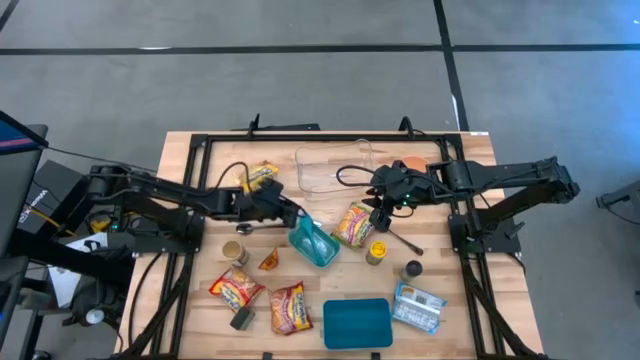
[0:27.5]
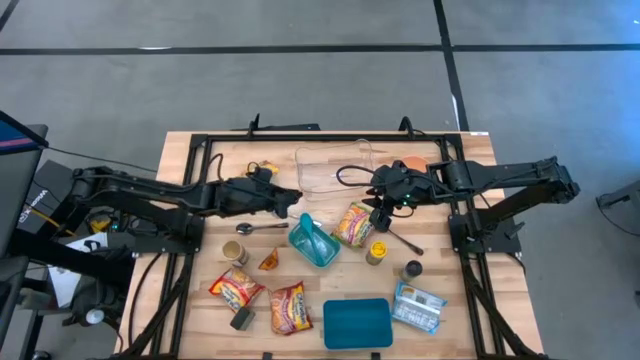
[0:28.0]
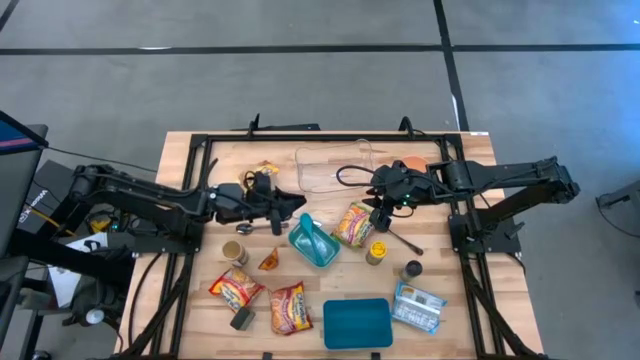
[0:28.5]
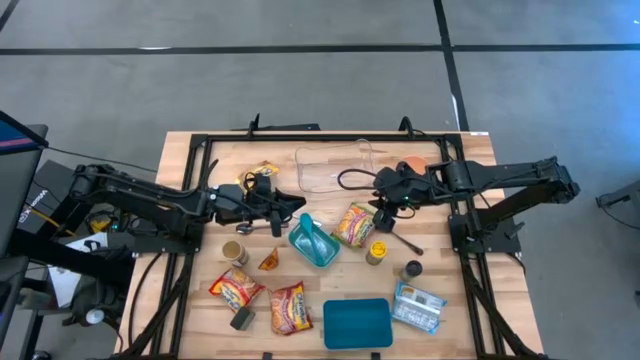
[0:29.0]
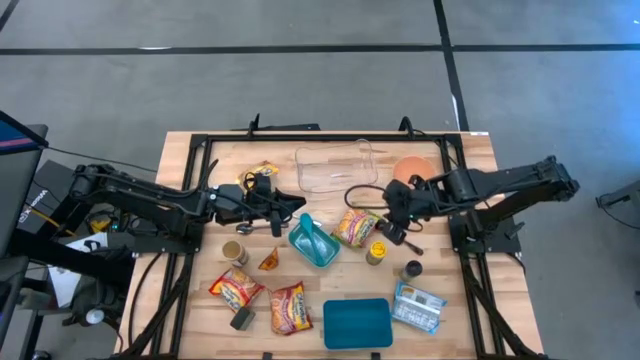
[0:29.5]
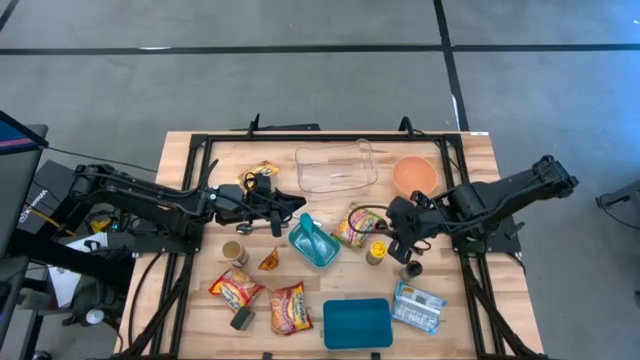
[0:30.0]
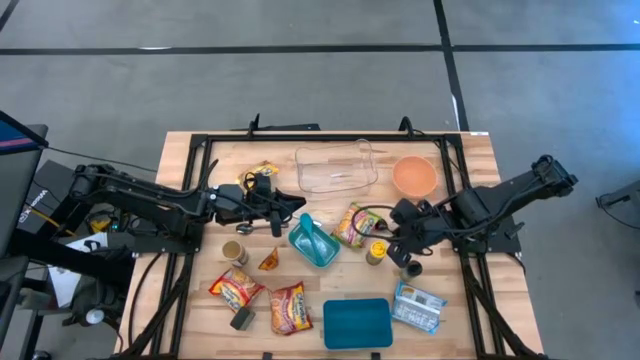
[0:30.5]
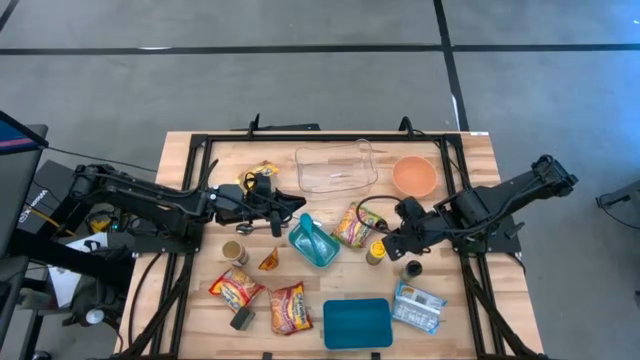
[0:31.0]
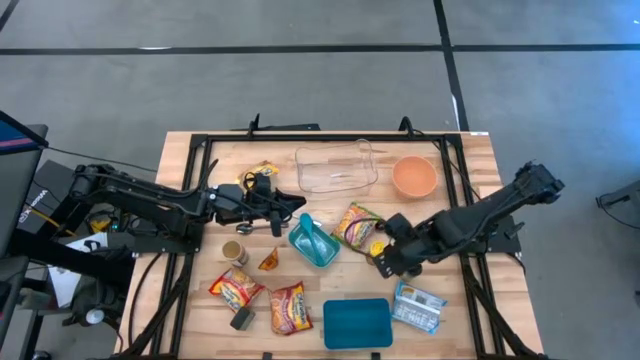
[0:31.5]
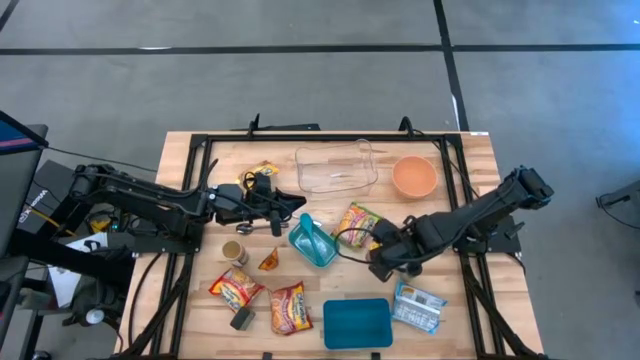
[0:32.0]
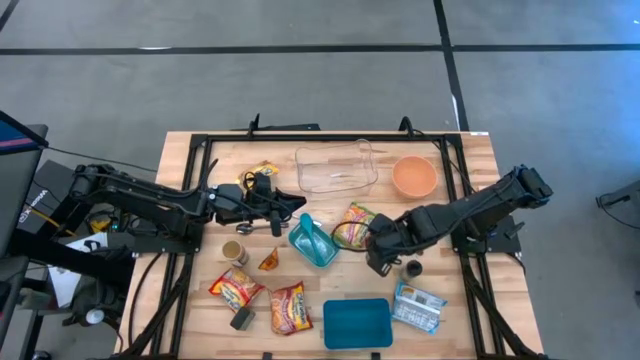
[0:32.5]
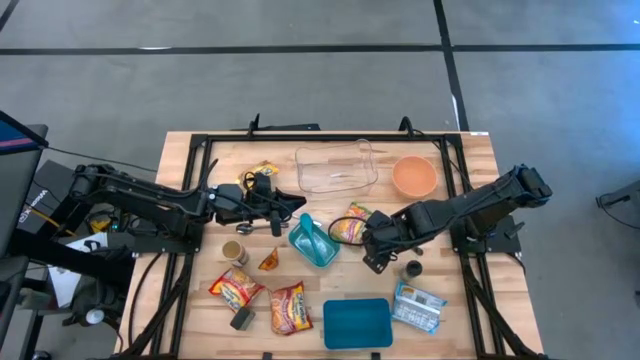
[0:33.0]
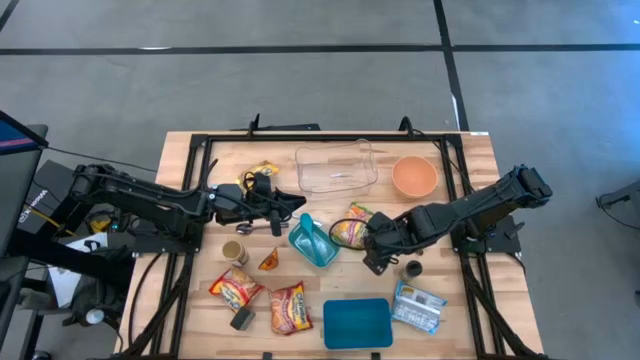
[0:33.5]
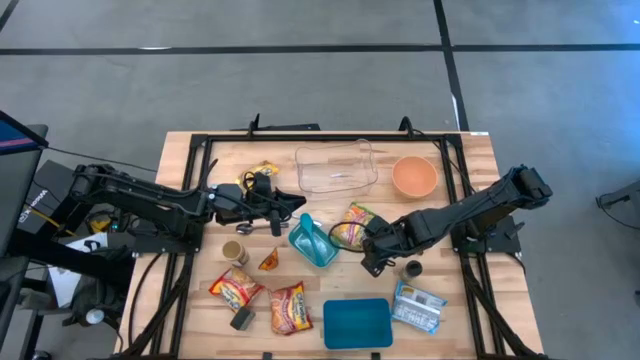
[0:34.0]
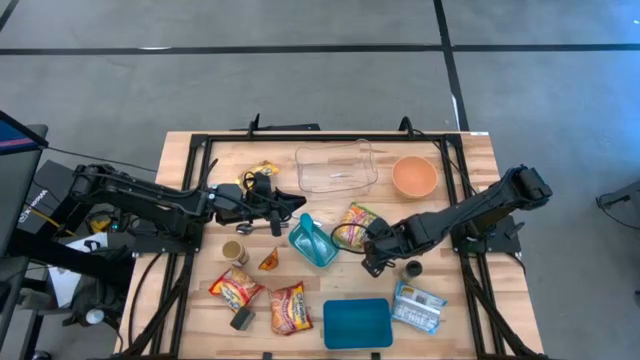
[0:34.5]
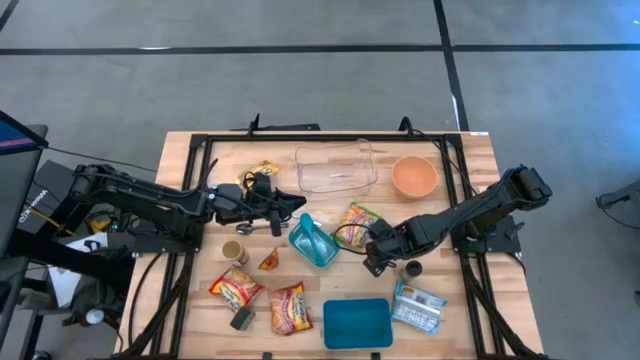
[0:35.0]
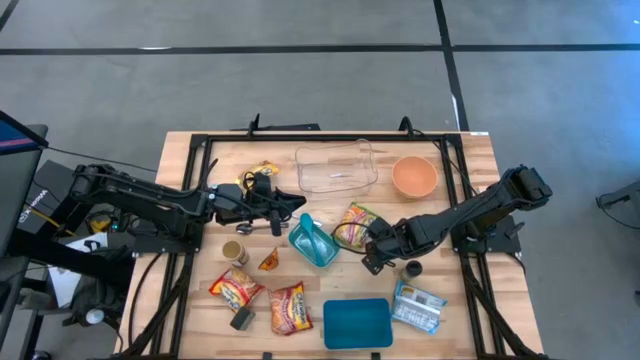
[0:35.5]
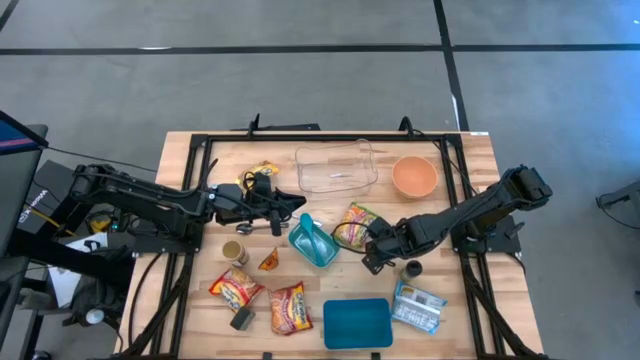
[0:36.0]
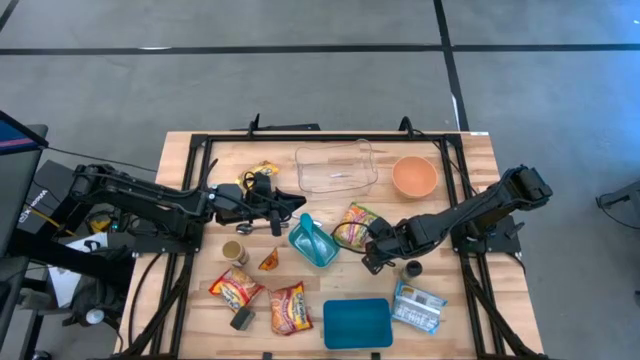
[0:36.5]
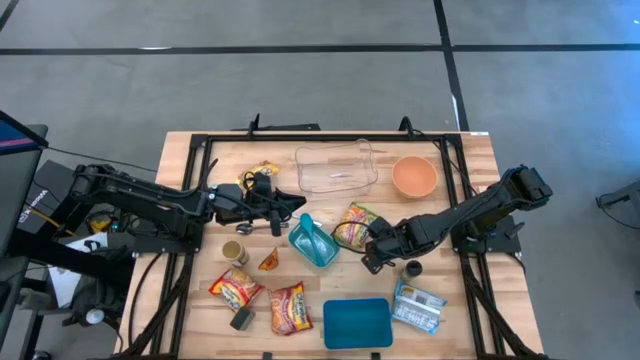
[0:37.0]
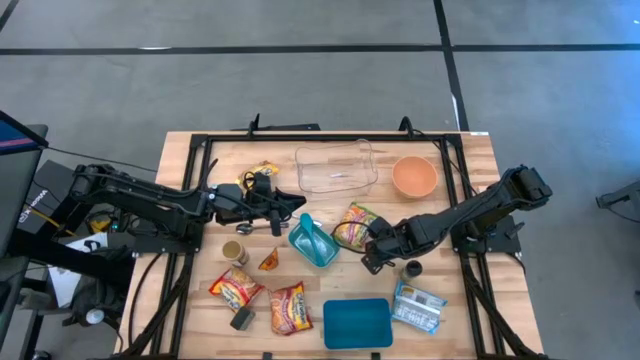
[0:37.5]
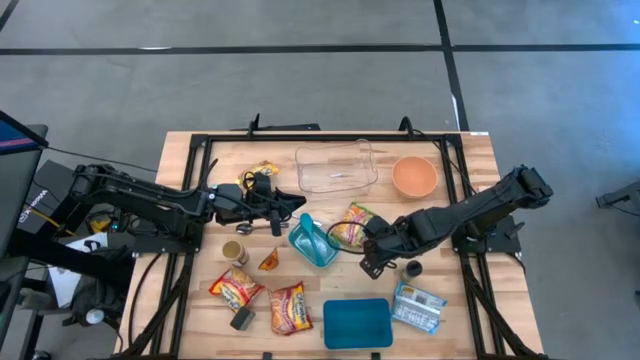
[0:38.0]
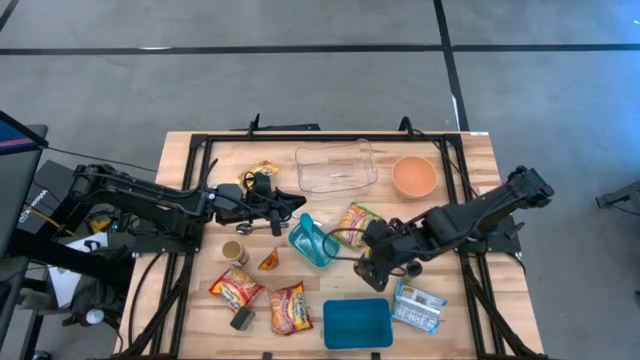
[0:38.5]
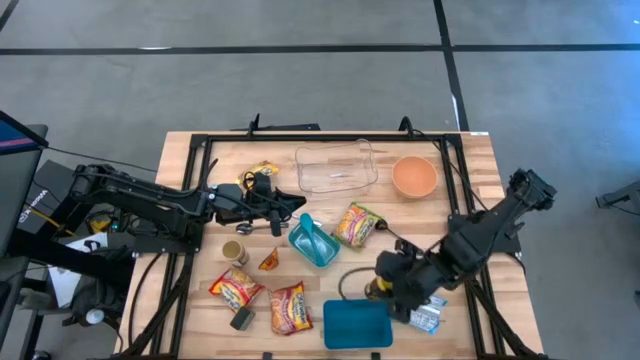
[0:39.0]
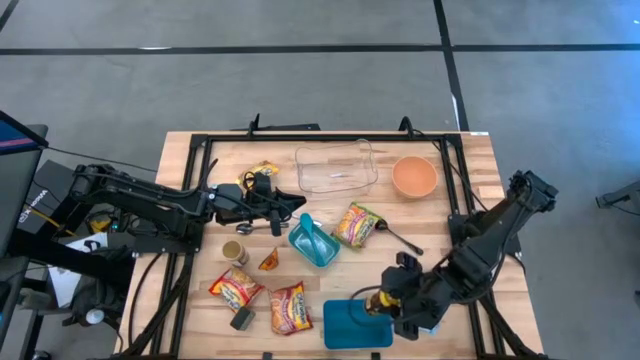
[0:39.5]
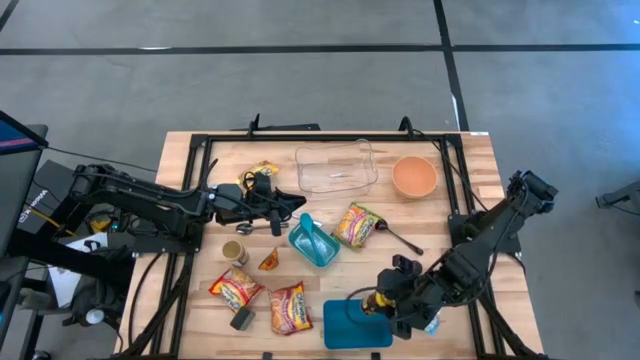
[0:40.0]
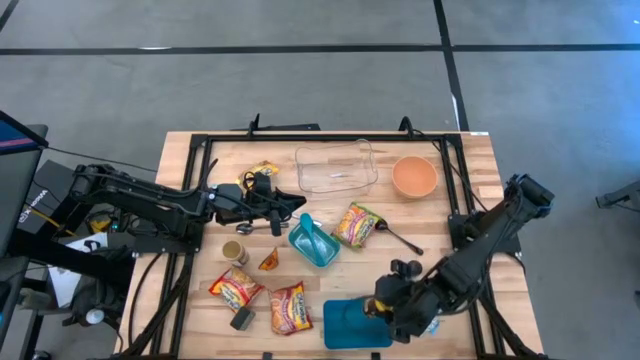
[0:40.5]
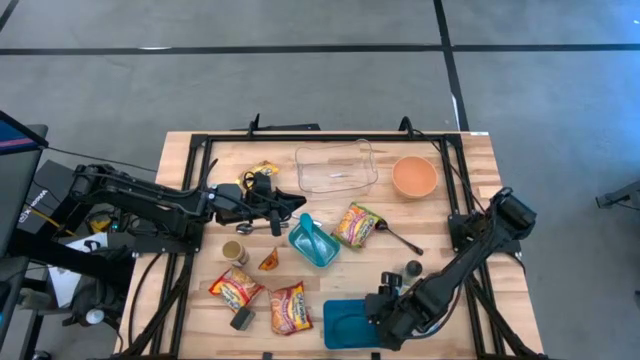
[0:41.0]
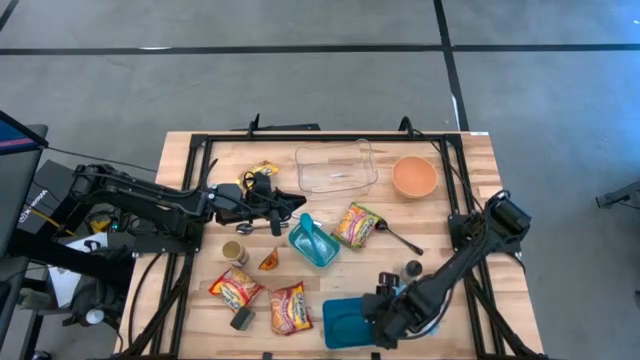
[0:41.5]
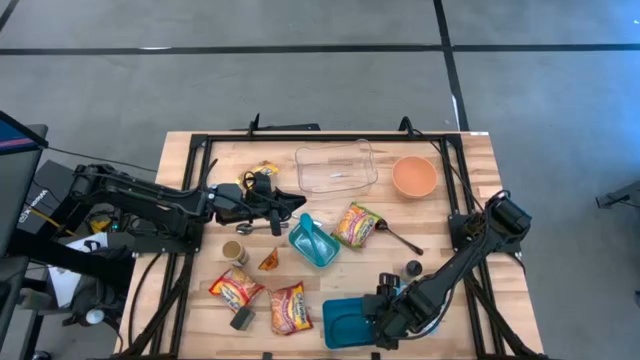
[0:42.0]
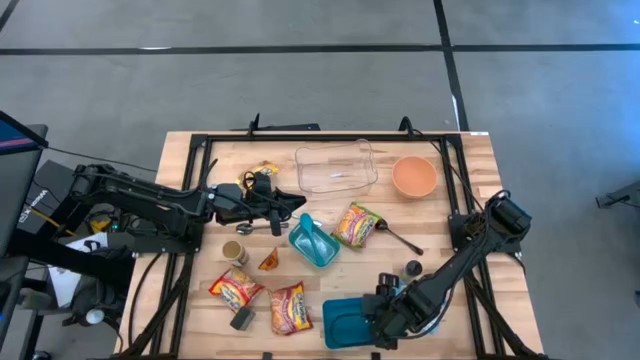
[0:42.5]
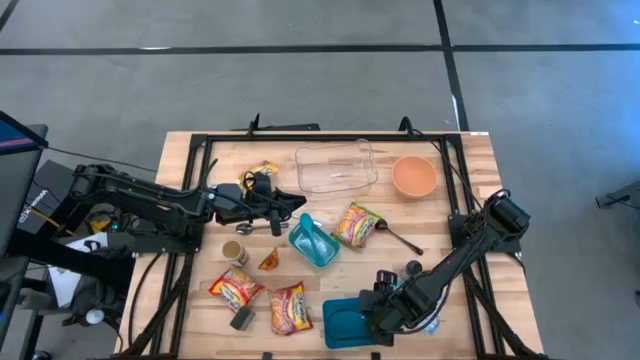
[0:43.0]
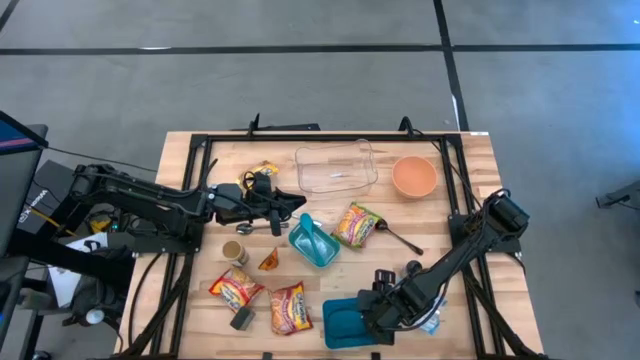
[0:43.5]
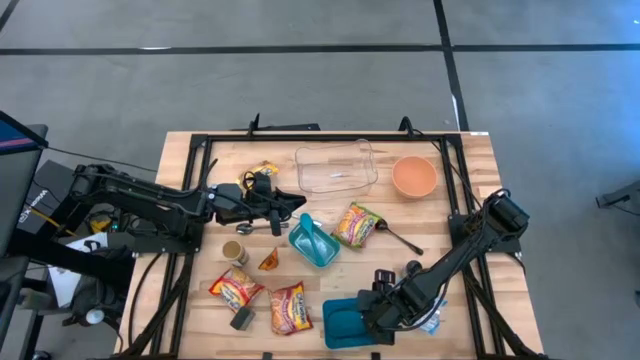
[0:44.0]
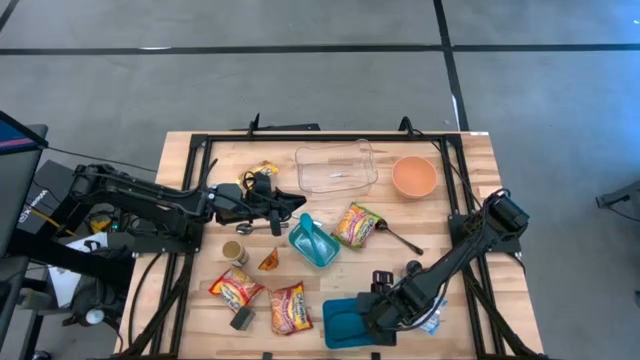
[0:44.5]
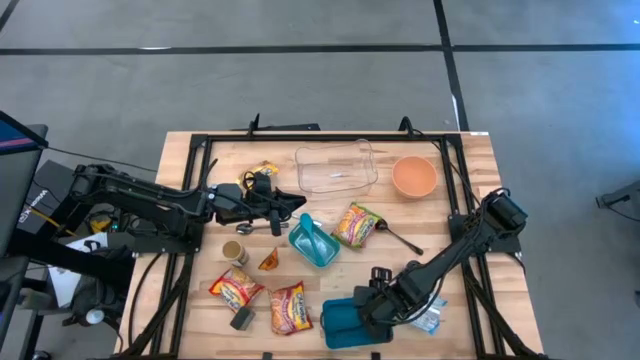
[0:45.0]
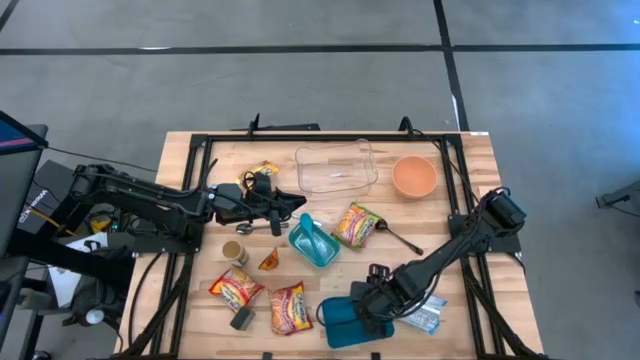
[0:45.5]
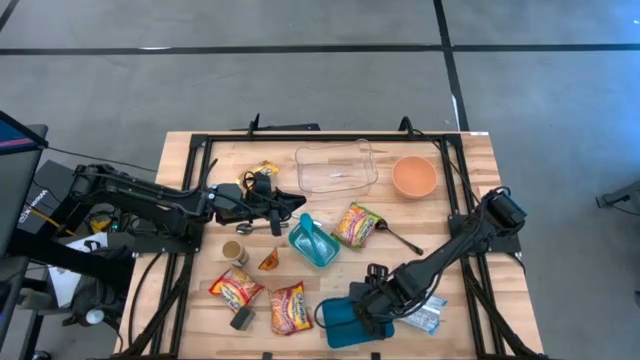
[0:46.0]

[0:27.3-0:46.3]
Task: Pick & Place Food Item
Put the yellow seasoning bottle into the blue bin

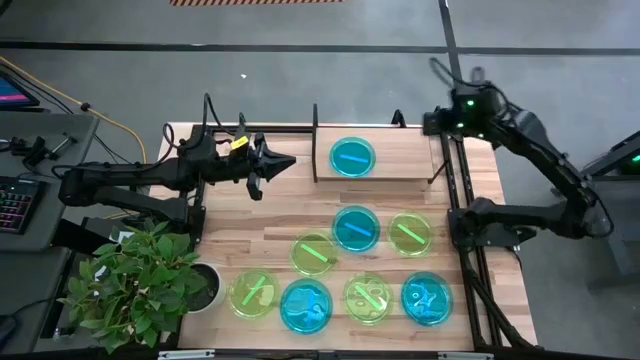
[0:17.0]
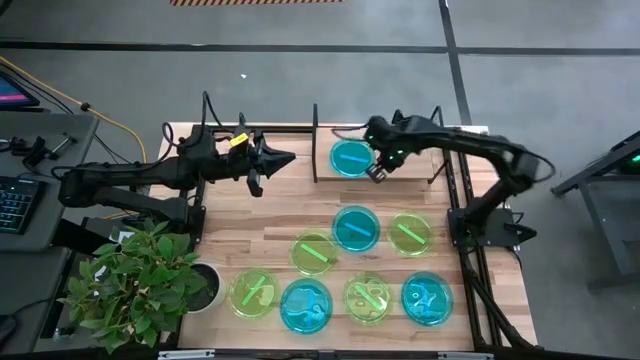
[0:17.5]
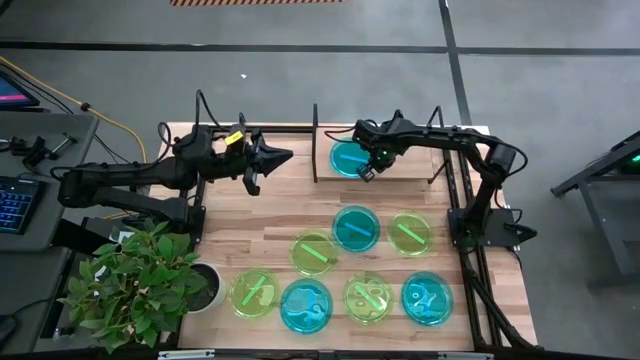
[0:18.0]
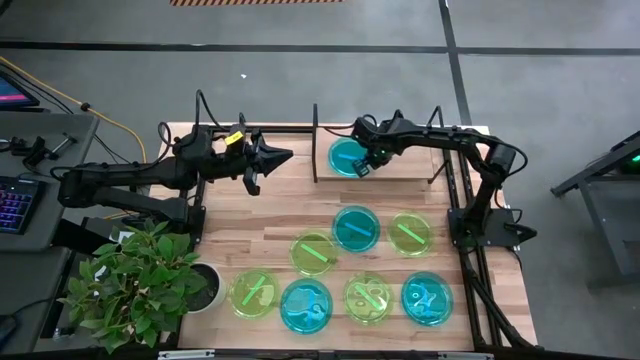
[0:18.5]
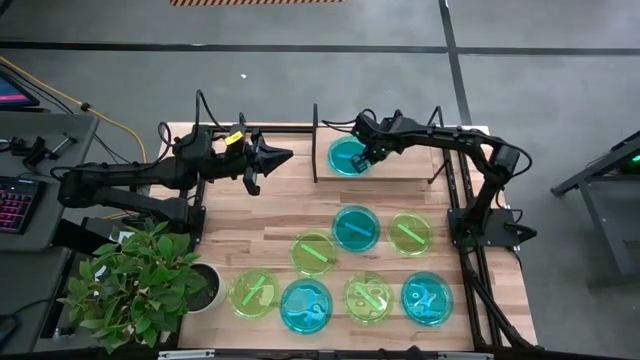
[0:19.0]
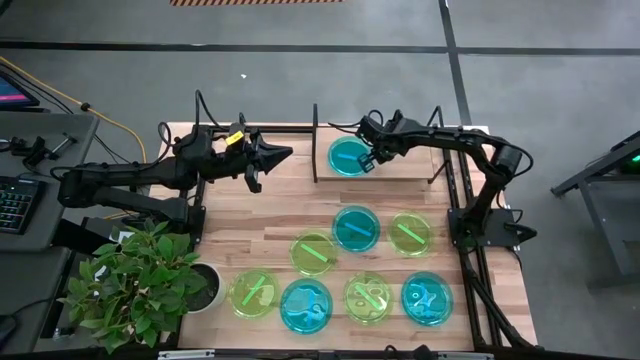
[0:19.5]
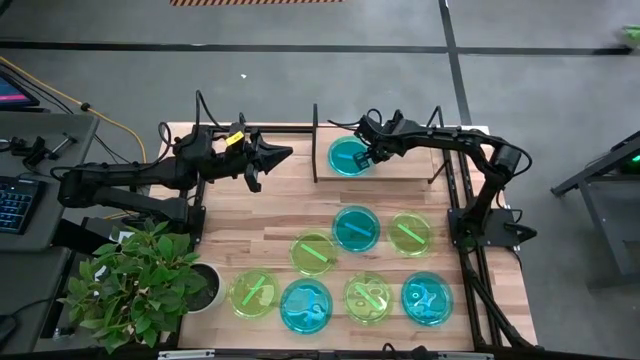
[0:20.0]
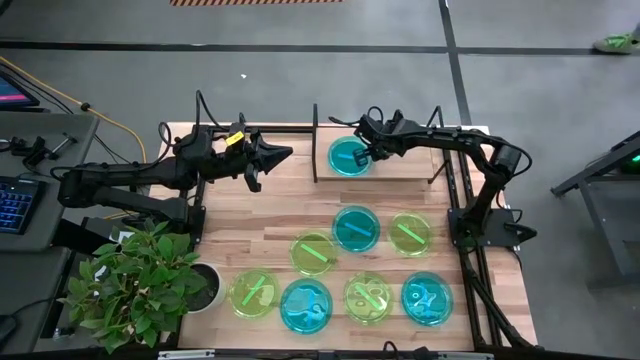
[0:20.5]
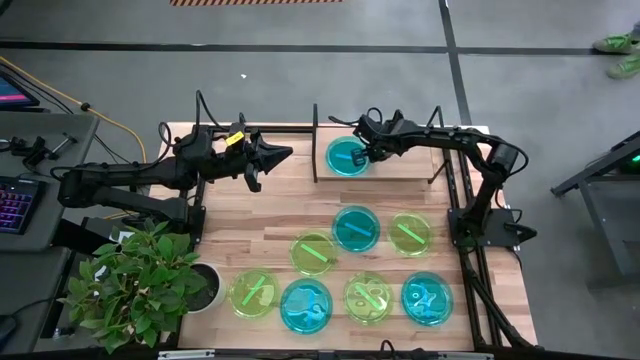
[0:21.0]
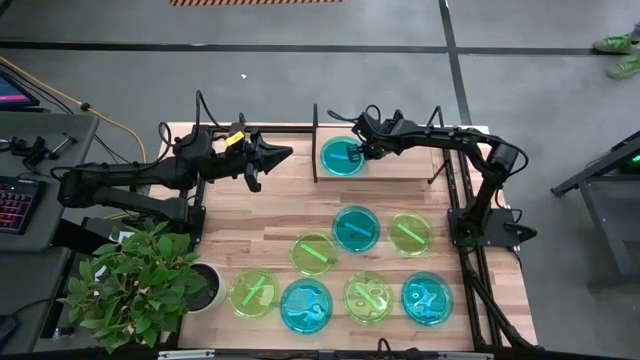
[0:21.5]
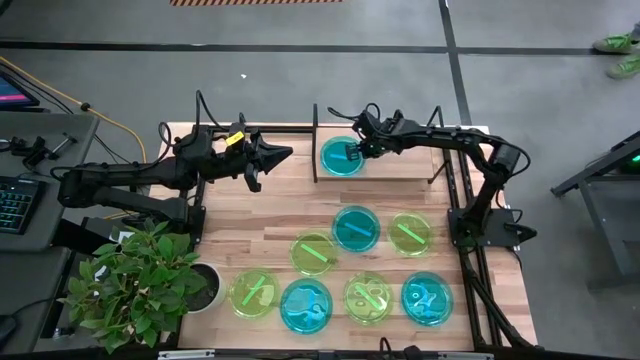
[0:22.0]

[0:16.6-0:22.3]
Task: Place and stack plates onto a shelf
Adjust the blue plate on the shelf
